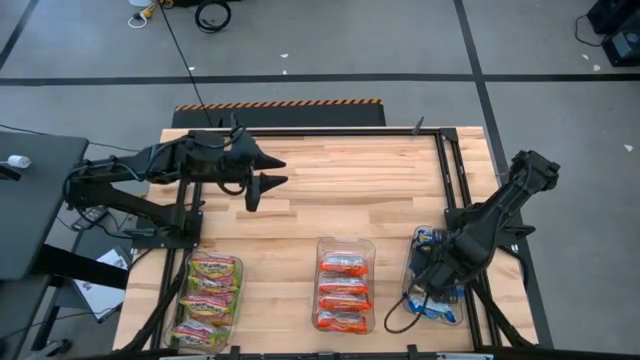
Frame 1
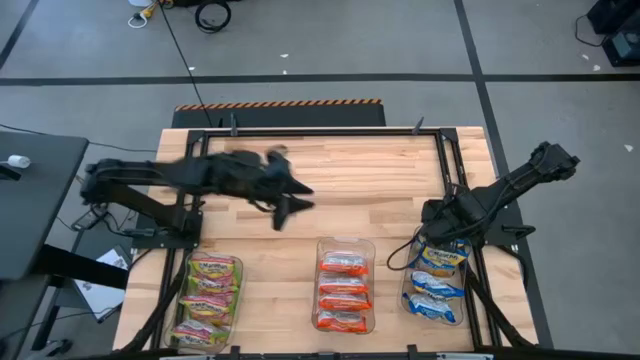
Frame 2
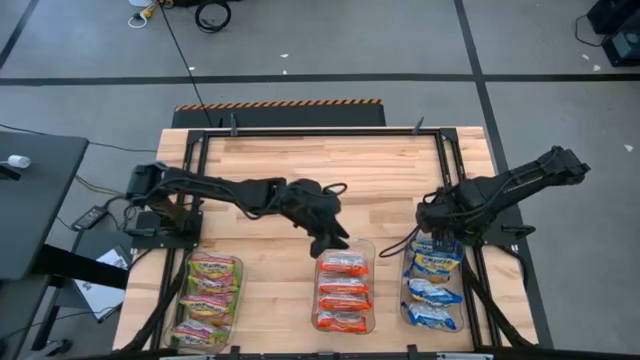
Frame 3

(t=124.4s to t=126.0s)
Task: Sort Maruchan noodles
Adjust the right transparent bin

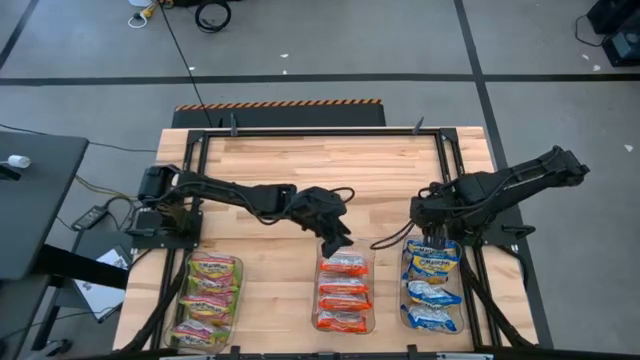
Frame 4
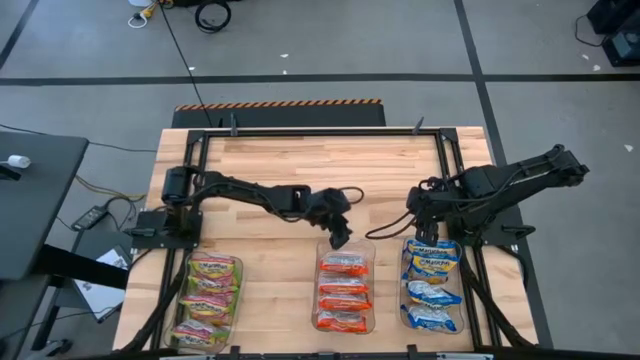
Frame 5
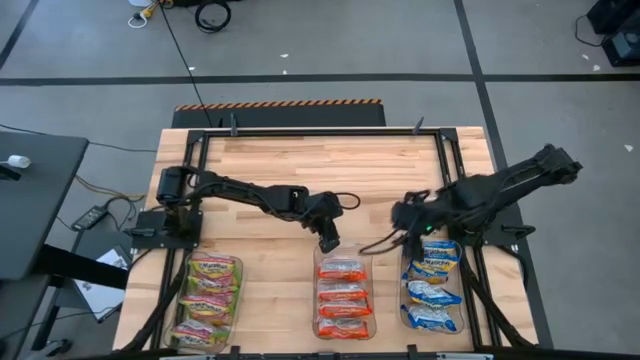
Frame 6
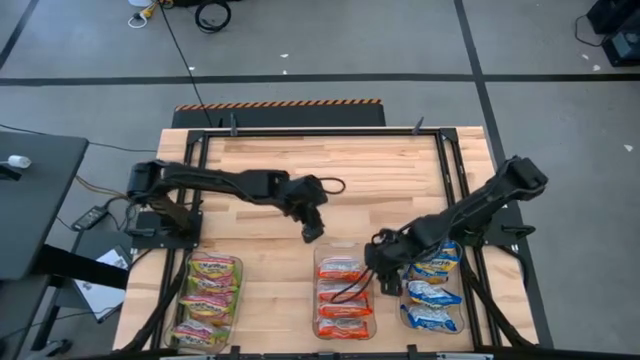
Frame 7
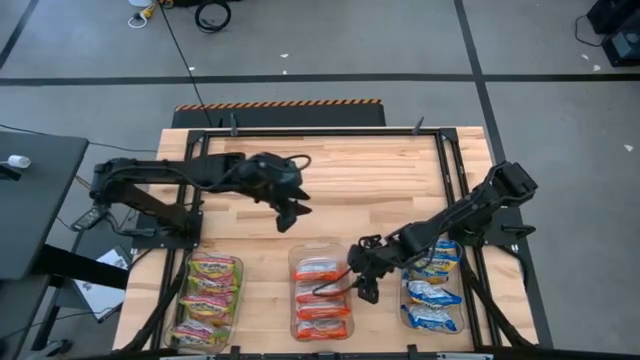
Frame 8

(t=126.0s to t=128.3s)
Adjust the middle transparent bin

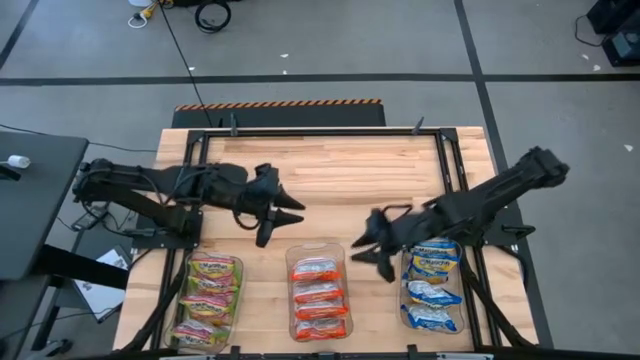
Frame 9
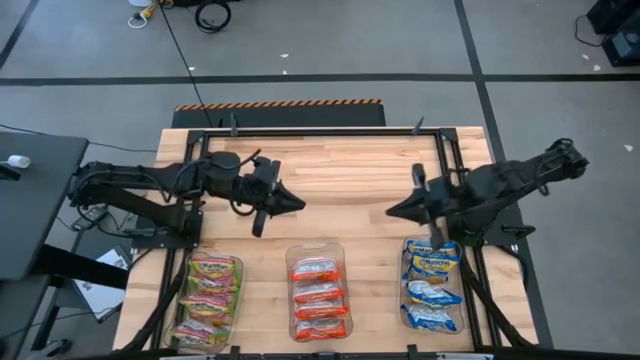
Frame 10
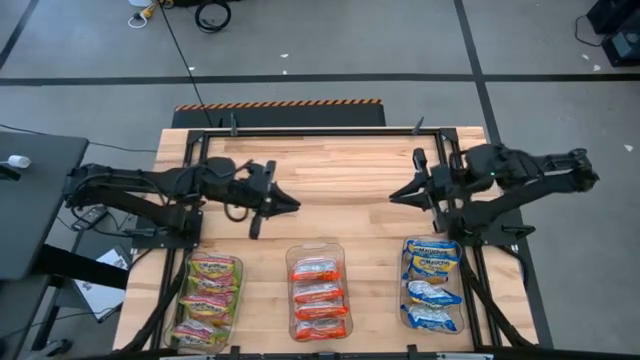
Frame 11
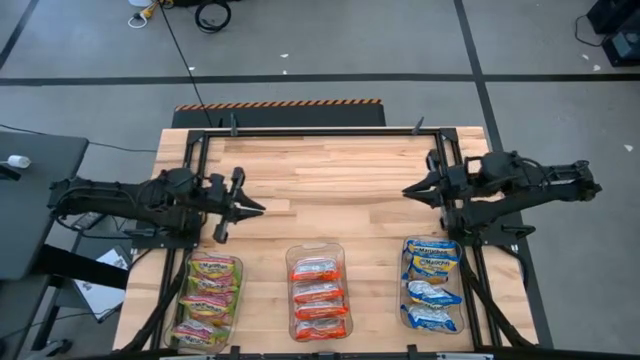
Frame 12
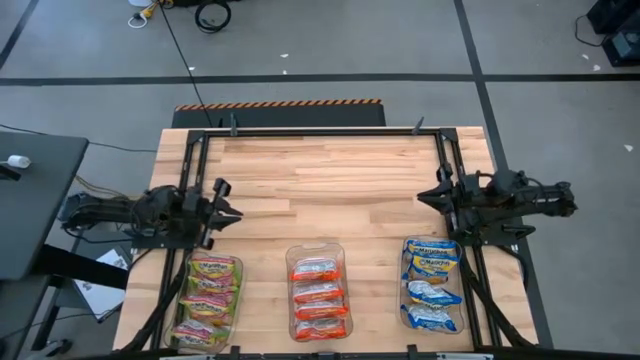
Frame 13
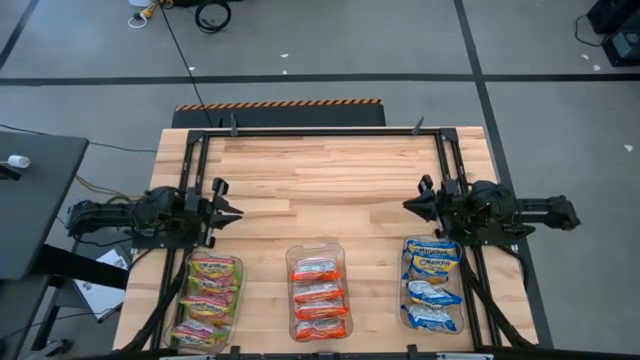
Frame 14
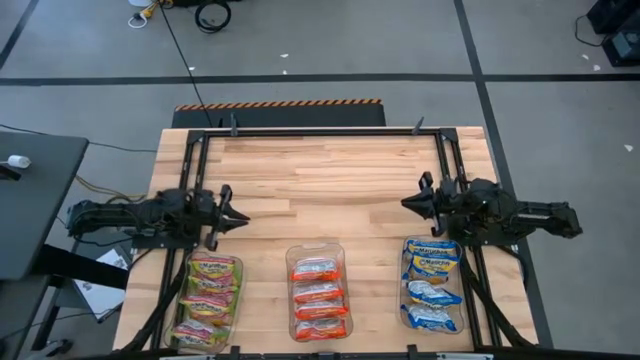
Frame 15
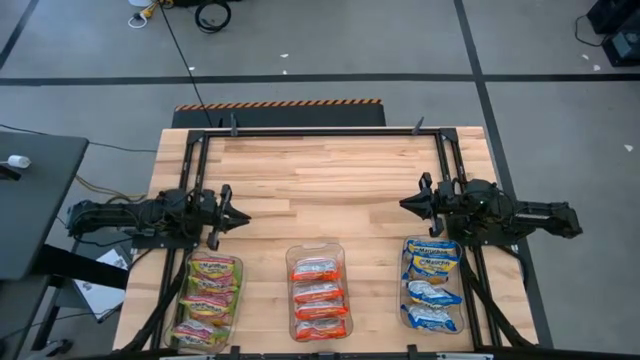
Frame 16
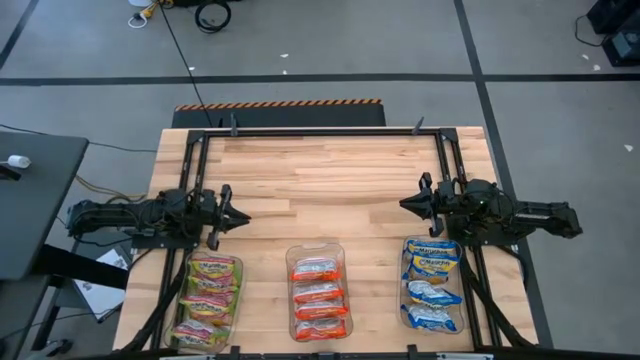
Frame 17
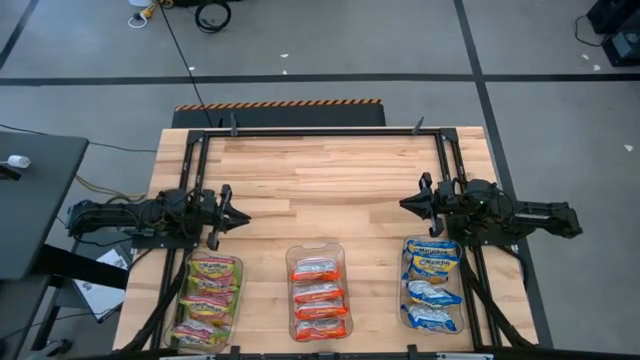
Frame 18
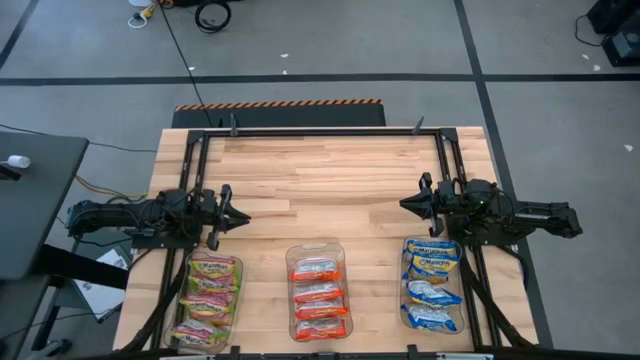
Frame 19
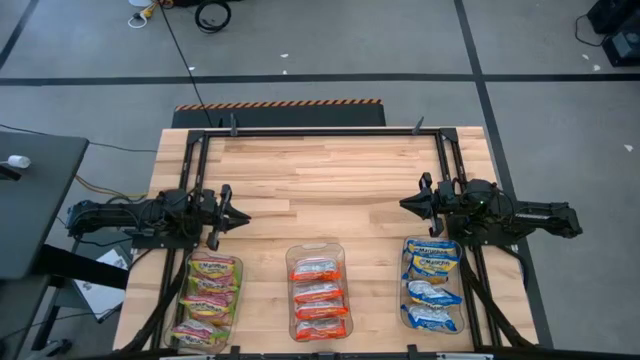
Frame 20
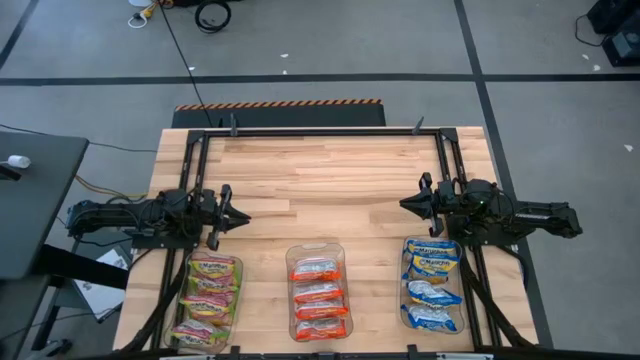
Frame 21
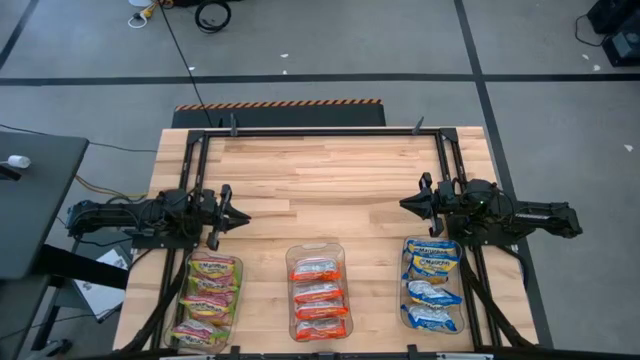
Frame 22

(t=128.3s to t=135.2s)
Return to Home Position

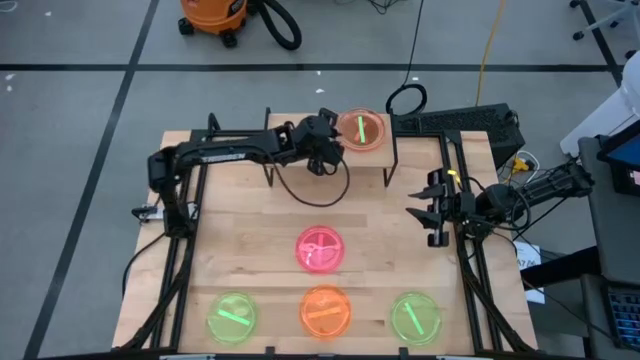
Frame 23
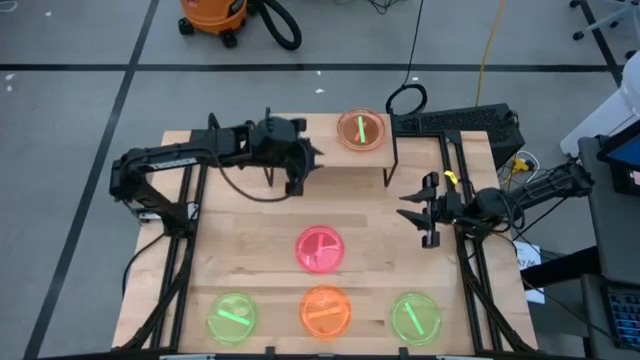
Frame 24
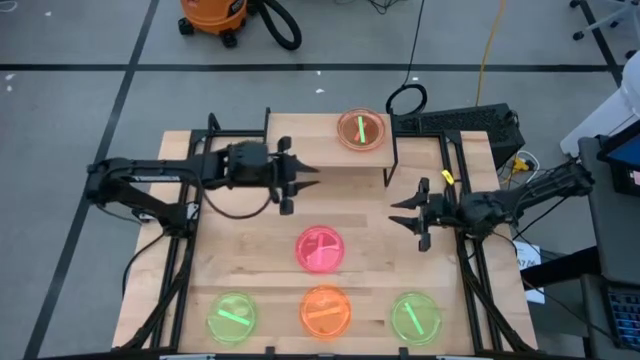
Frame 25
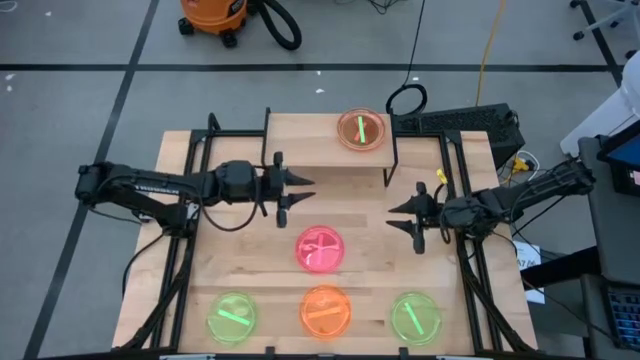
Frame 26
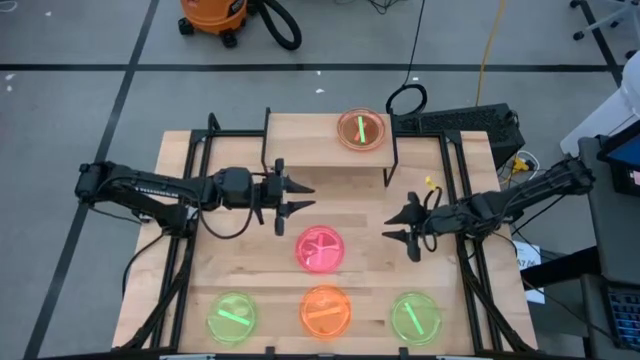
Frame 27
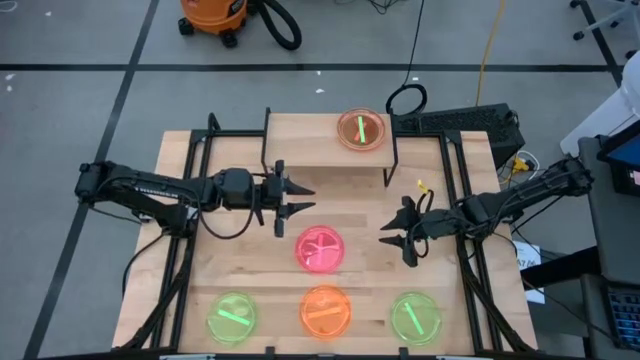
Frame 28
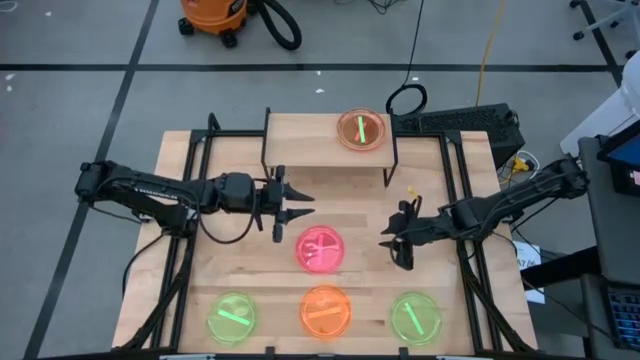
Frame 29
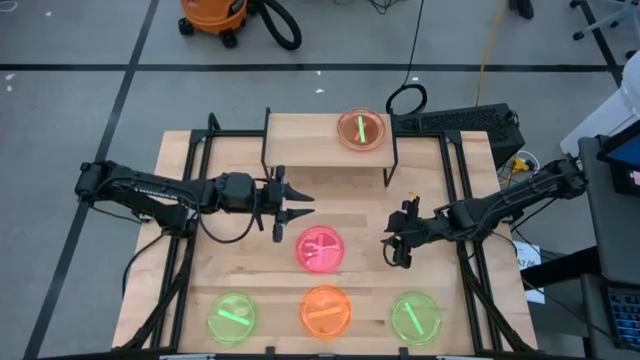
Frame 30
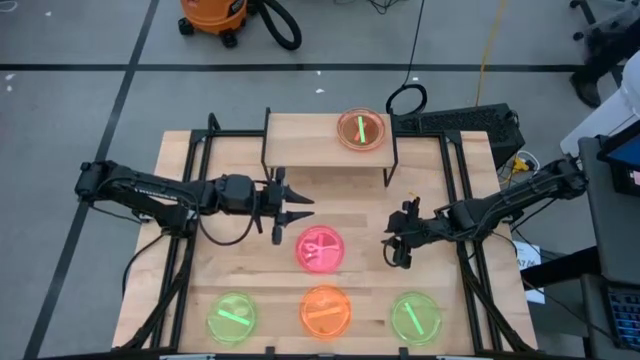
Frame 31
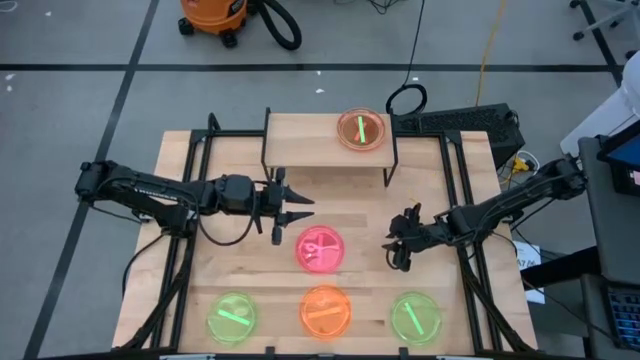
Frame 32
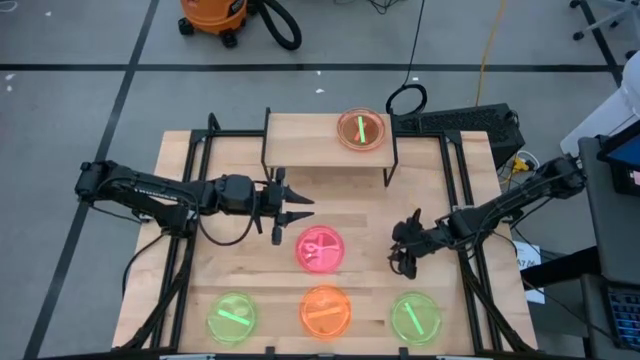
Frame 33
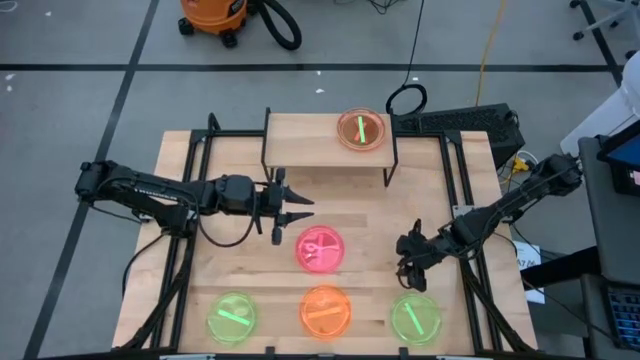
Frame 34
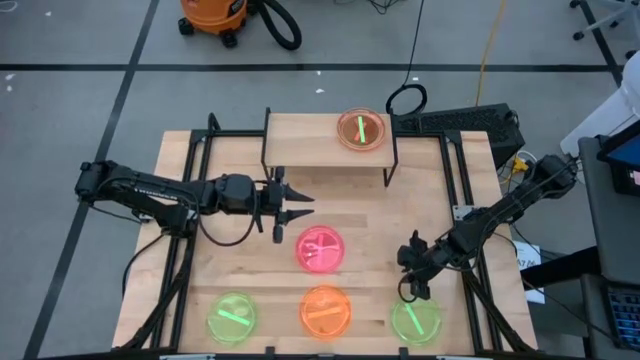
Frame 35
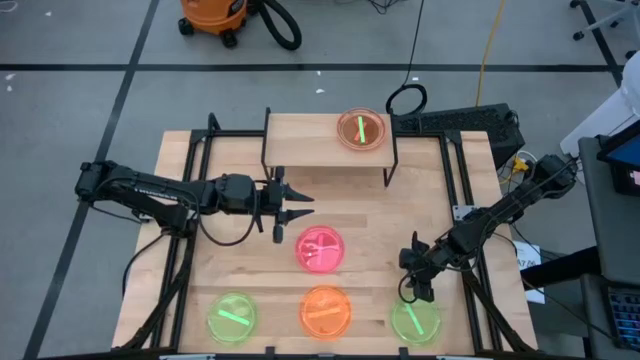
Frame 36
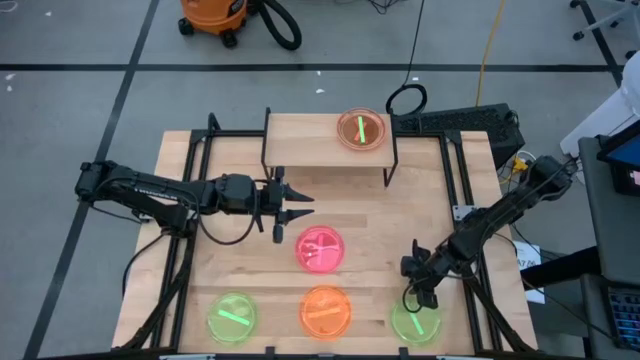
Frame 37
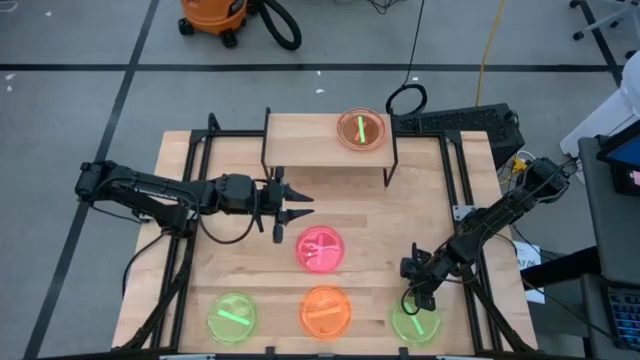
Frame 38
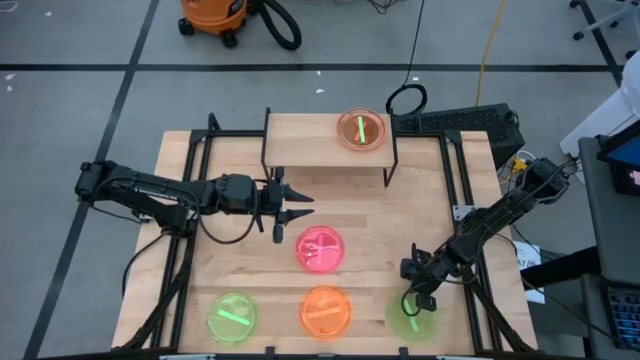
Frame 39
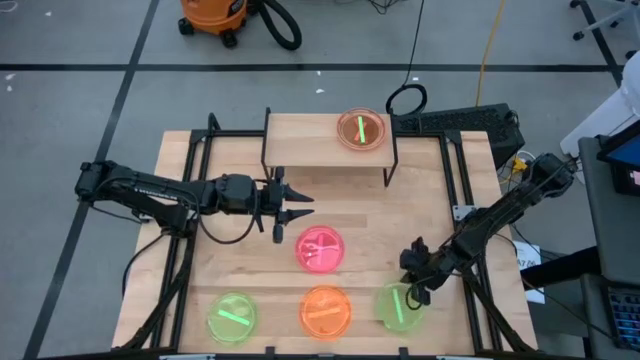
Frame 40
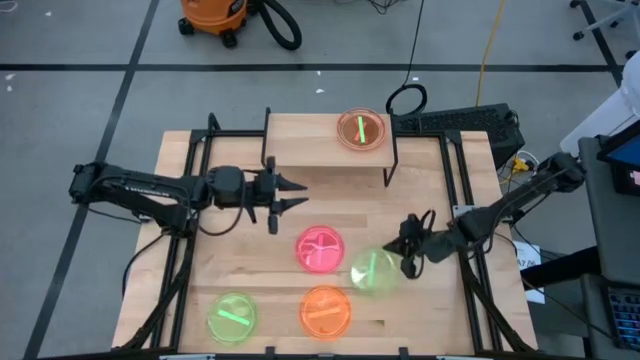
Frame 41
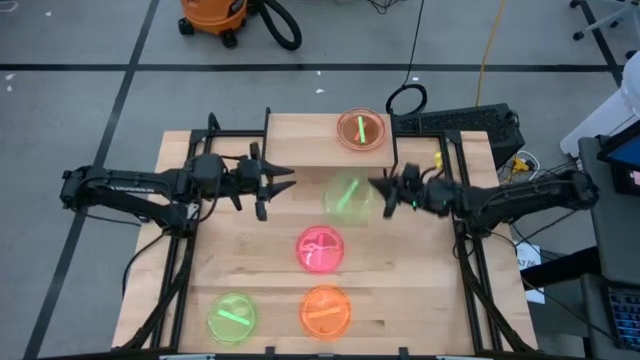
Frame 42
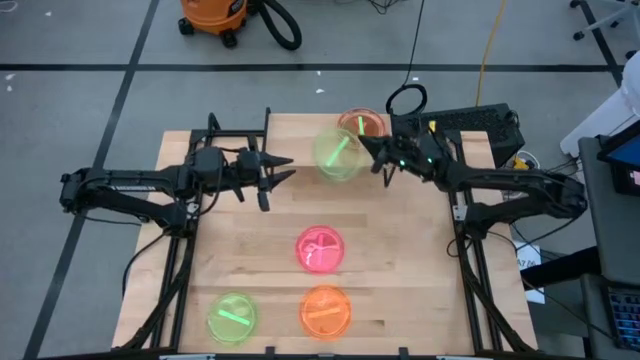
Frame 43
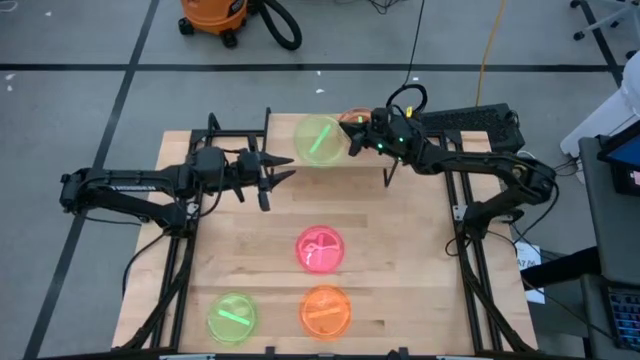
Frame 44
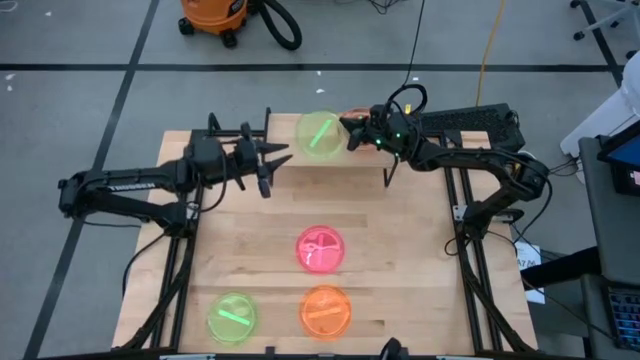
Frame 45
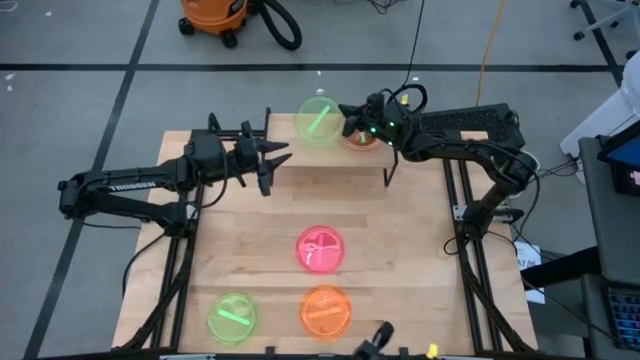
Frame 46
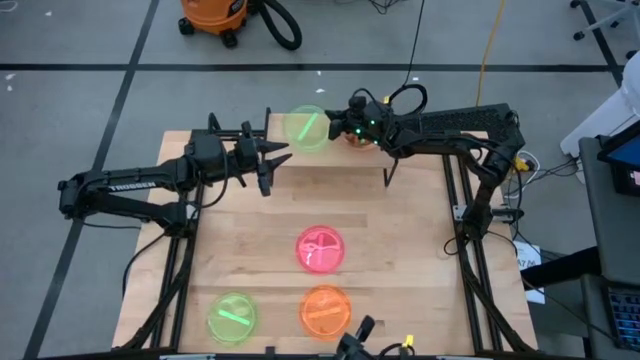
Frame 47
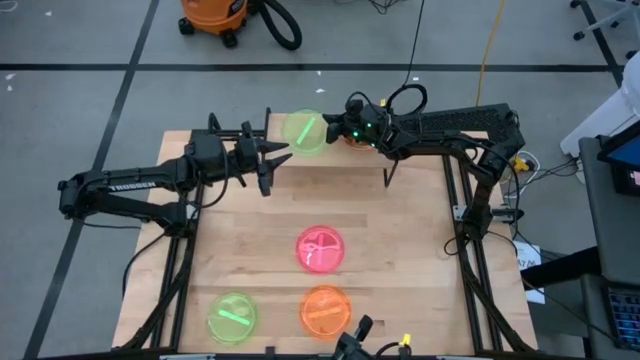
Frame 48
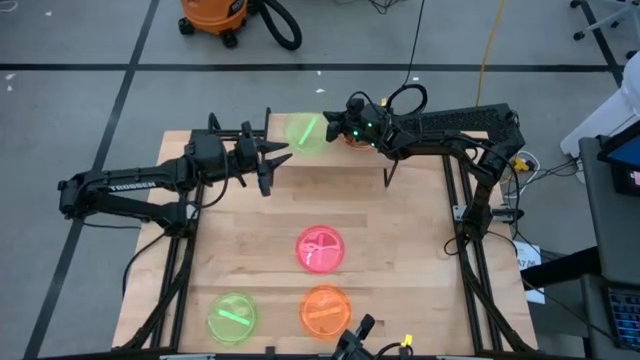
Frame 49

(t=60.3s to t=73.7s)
Task: Place and stack plates onto a shelf
Put the green plate on the shelf
